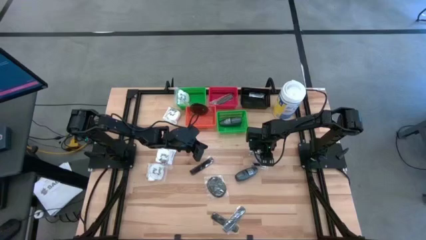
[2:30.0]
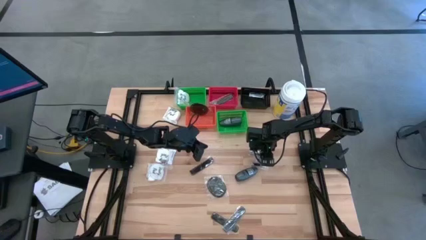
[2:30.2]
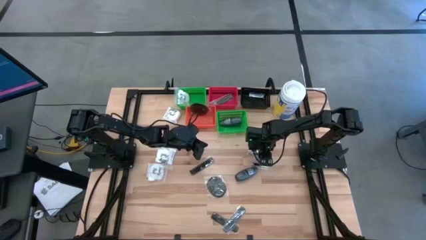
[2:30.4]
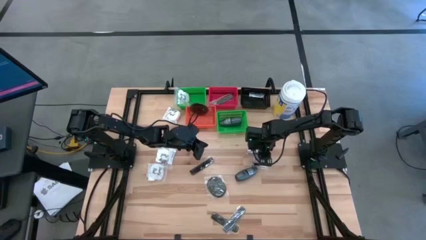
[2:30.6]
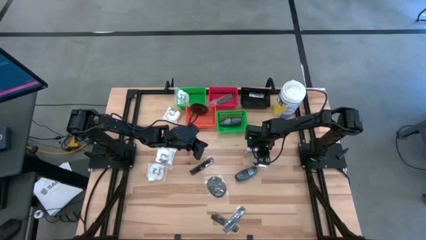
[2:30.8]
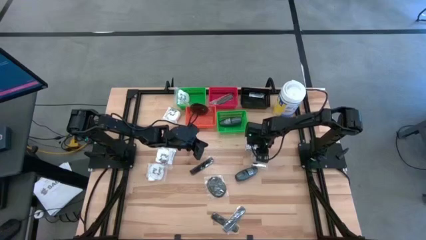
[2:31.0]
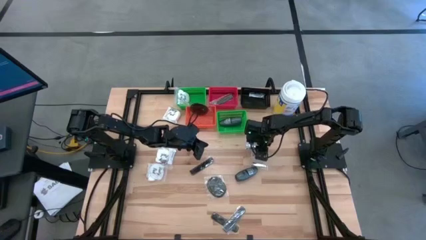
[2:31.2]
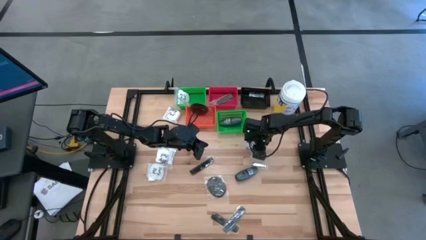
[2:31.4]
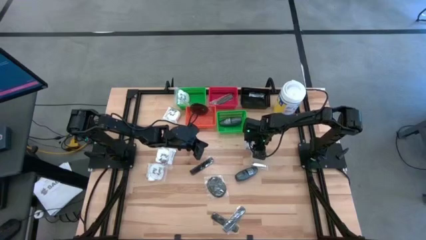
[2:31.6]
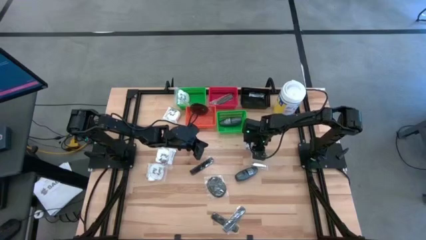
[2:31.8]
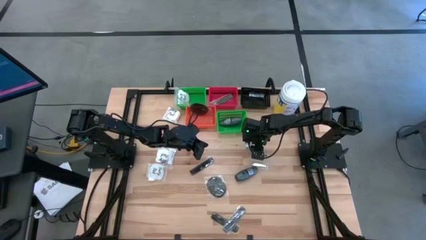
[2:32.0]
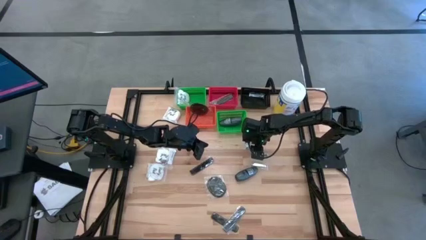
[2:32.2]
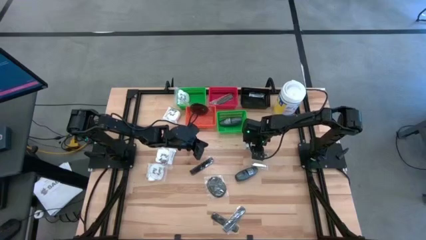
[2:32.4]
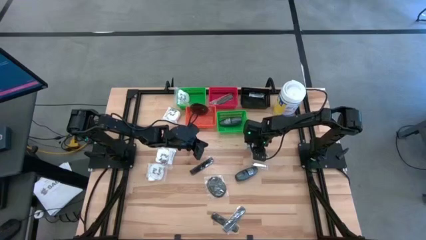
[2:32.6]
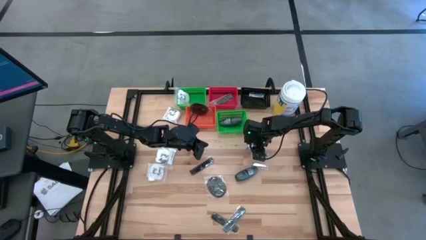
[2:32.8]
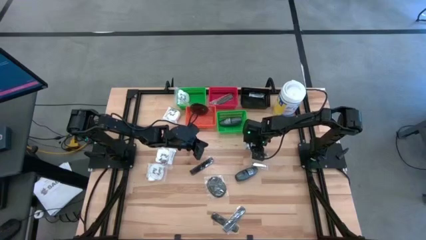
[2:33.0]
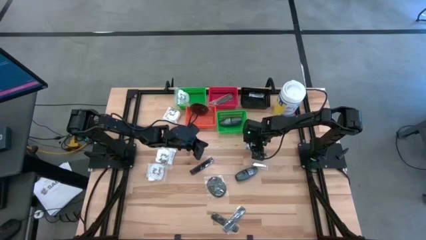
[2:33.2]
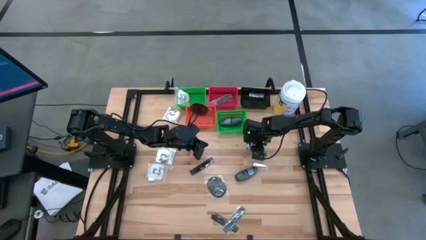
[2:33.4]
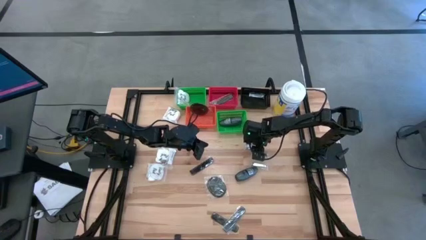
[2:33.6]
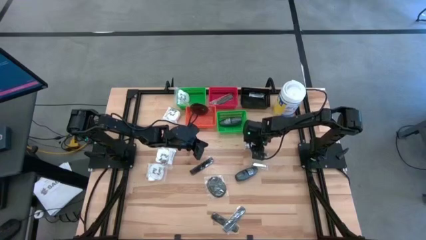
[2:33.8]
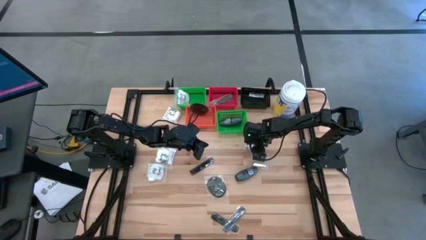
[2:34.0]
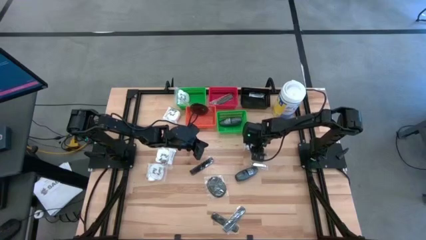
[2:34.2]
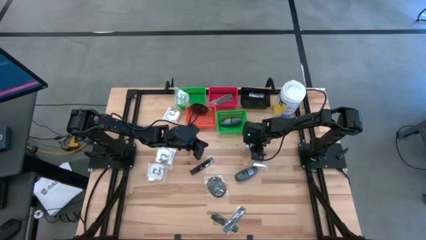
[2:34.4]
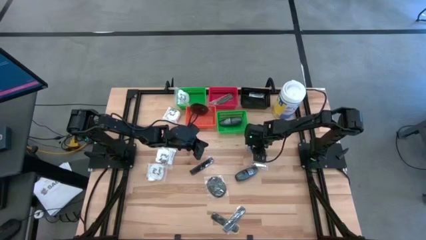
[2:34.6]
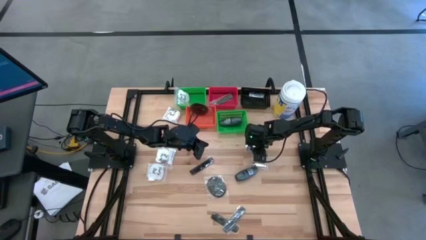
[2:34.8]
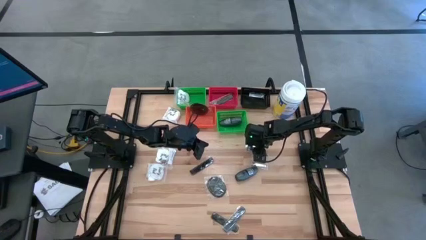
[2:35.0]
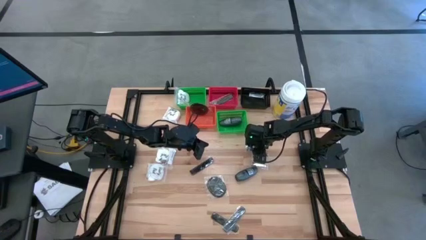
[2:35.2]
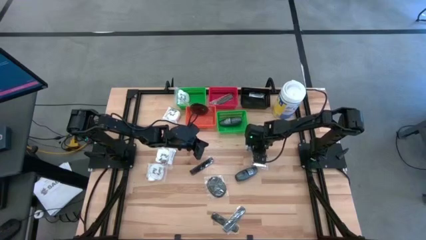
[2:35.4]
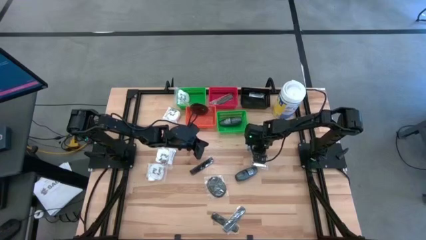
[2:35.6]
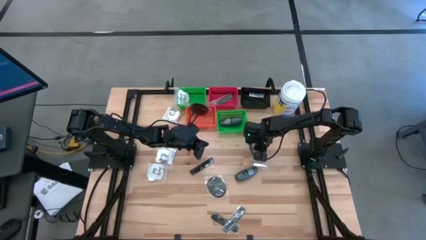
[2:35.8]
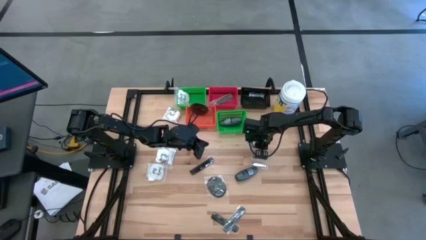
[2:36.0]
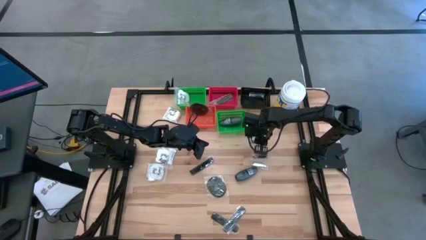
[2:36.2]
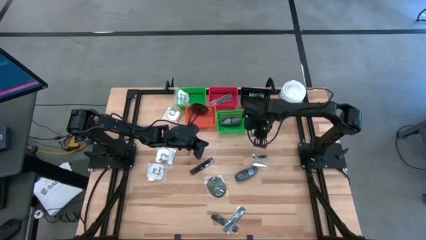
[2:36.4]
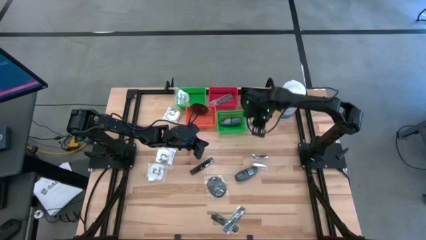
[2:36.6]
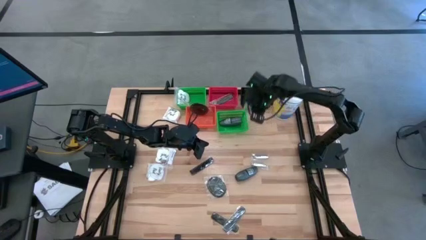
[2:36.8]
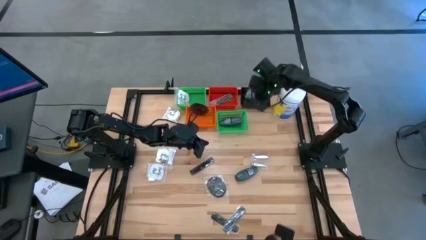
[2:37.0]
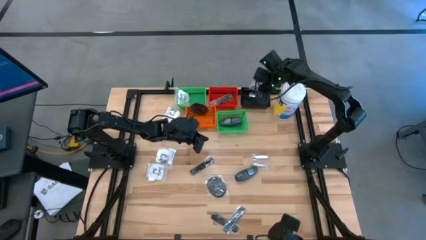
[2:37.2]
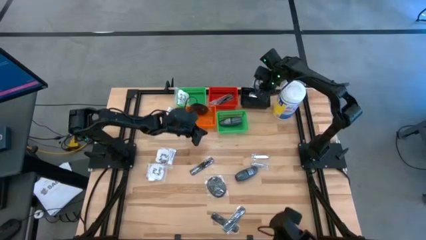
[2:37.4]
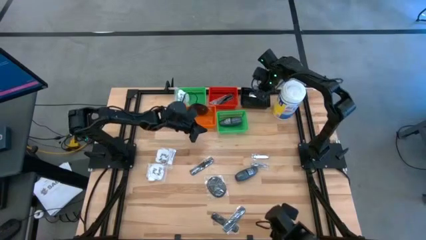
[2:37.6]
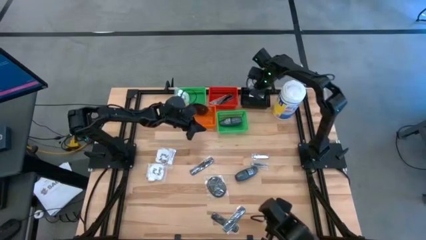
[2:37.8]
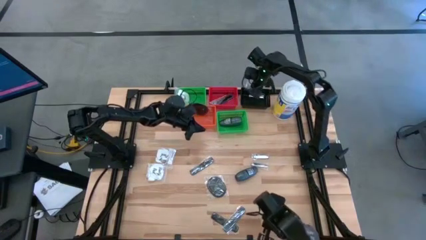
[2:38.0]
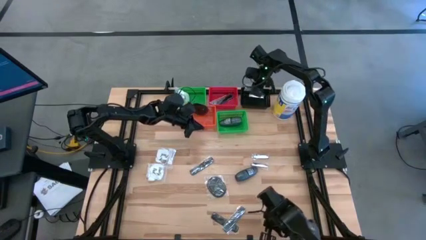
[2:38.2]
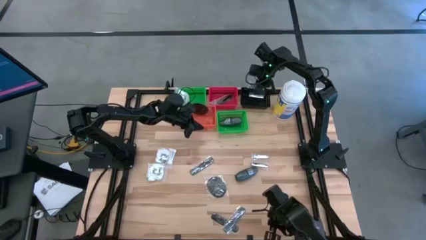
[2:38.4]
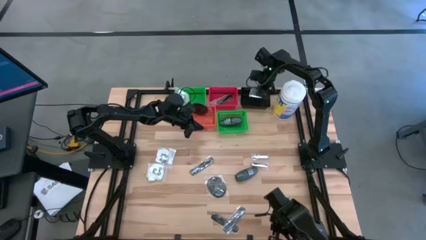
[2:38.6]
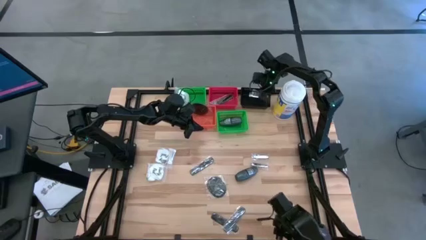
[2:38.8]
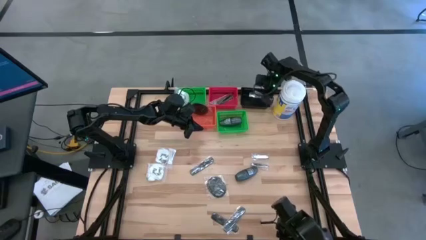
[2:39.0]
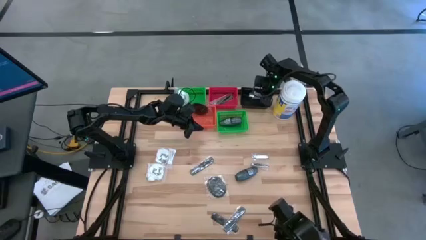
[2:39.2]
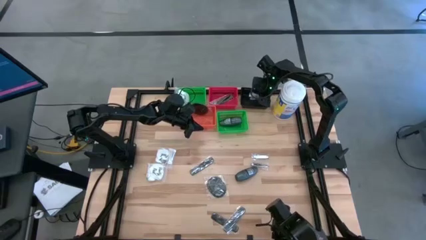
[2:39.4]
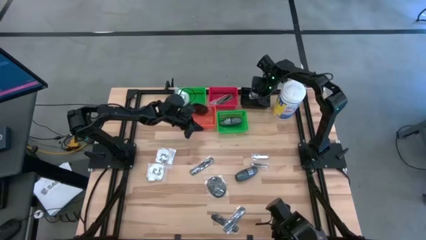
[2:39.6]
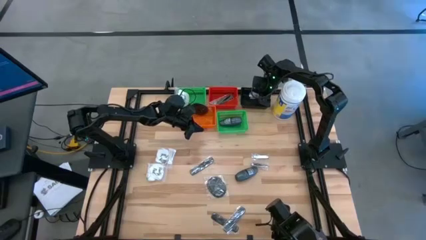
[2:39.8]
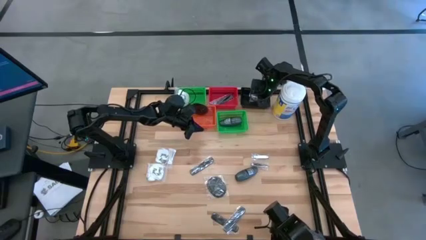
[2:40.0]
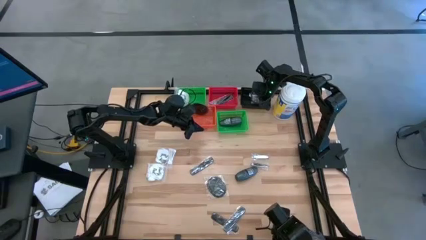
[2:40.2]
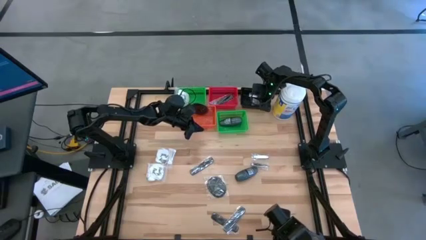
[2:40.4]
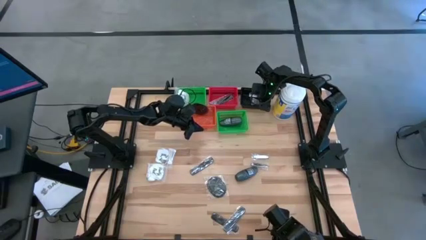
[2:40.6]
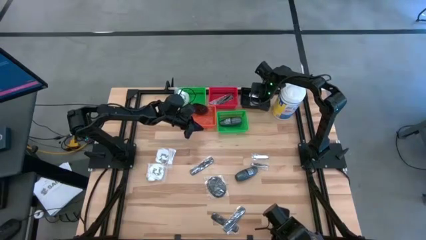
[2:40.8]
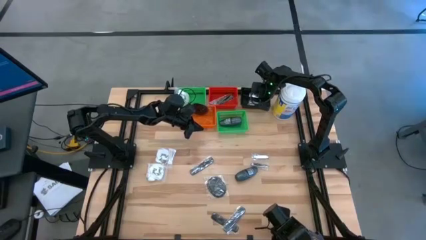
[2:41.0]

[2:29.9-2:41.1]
Task: Pick & Place Travel size toiletries
Put the nail cutter into the black bin

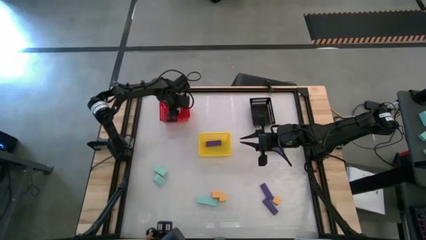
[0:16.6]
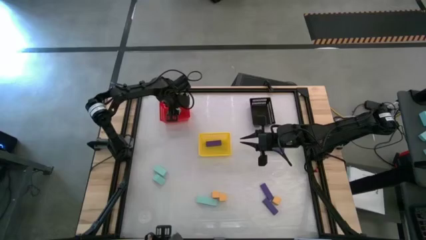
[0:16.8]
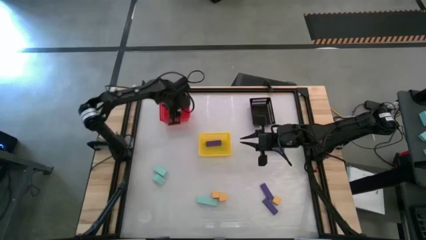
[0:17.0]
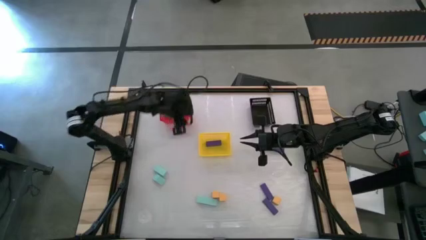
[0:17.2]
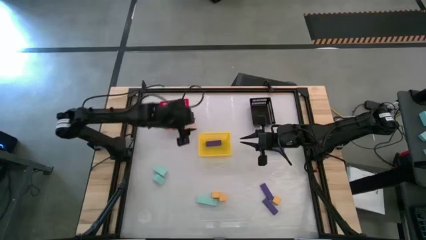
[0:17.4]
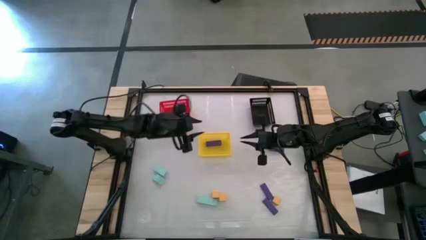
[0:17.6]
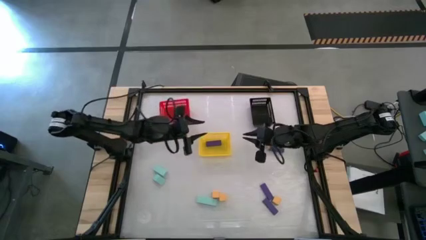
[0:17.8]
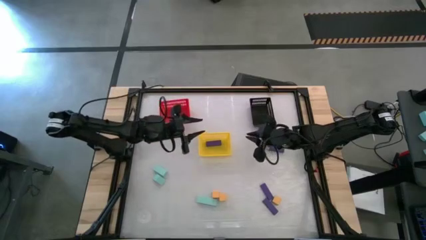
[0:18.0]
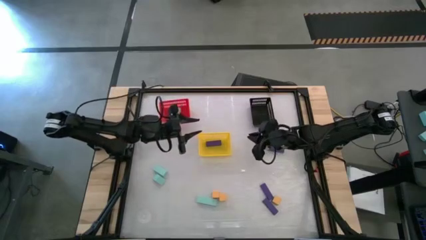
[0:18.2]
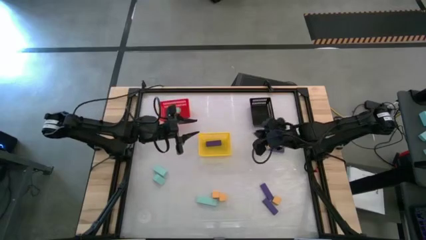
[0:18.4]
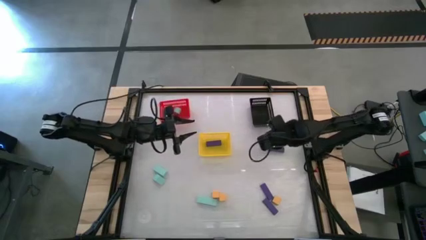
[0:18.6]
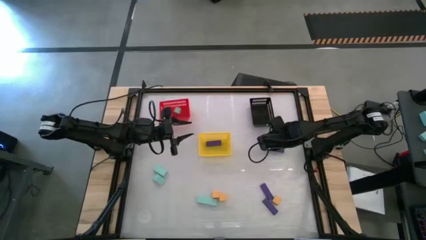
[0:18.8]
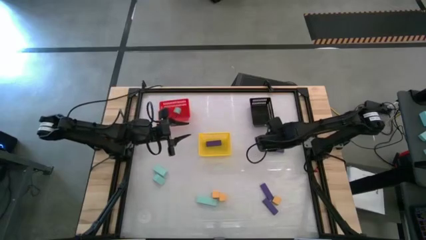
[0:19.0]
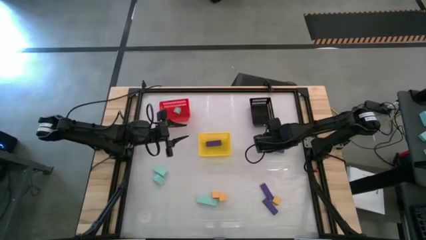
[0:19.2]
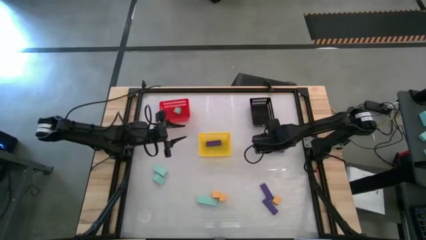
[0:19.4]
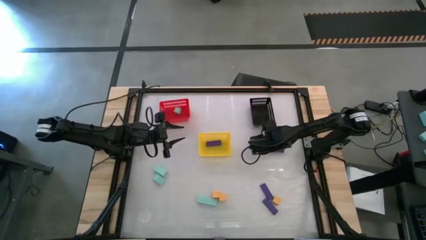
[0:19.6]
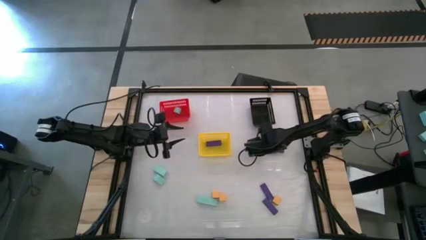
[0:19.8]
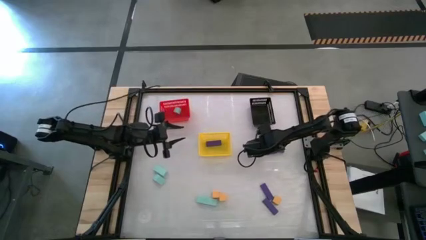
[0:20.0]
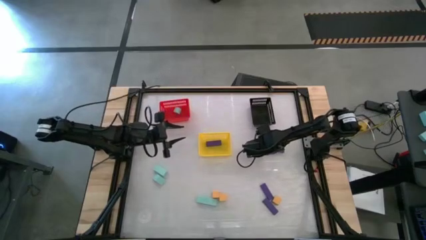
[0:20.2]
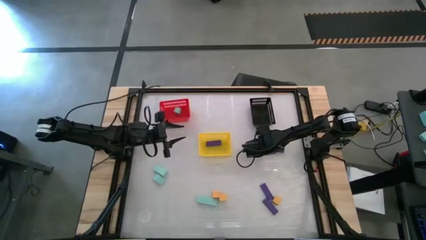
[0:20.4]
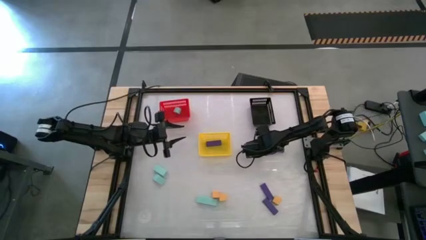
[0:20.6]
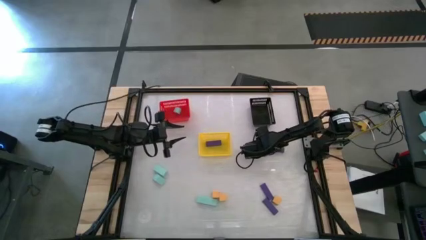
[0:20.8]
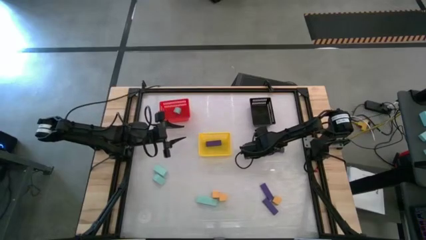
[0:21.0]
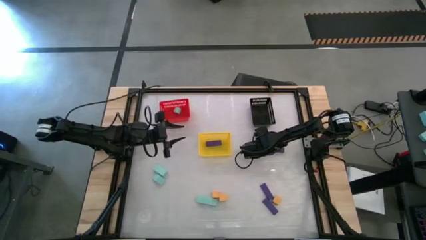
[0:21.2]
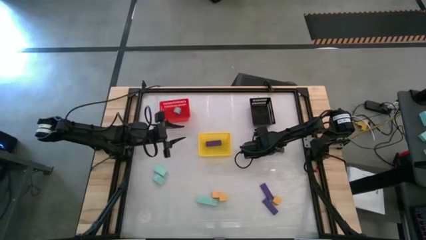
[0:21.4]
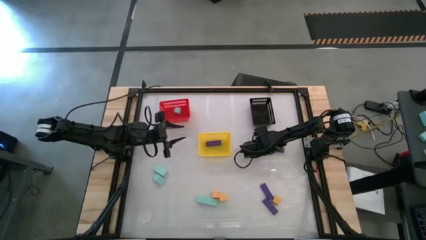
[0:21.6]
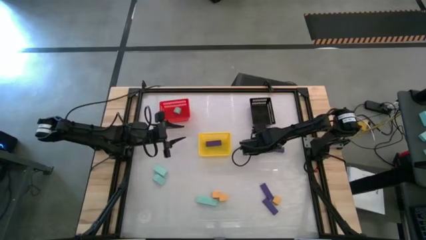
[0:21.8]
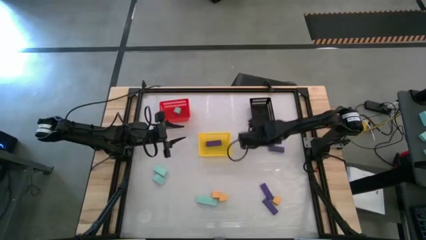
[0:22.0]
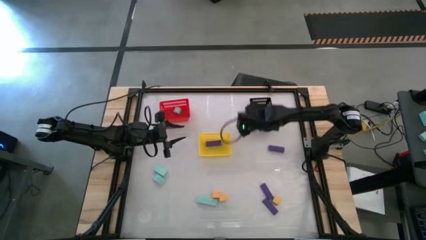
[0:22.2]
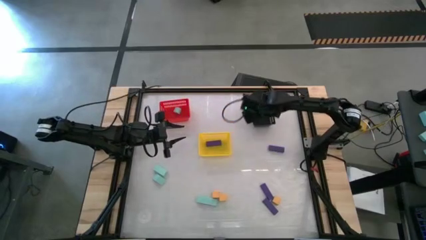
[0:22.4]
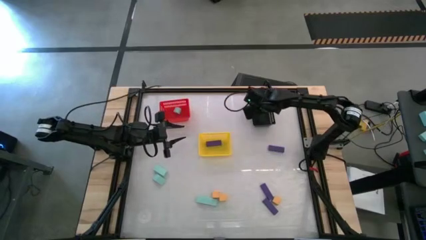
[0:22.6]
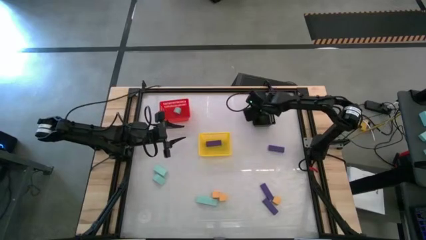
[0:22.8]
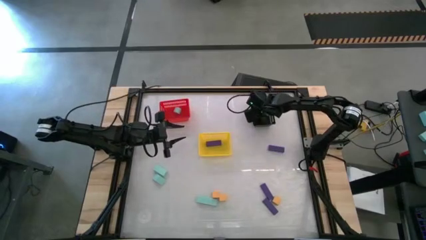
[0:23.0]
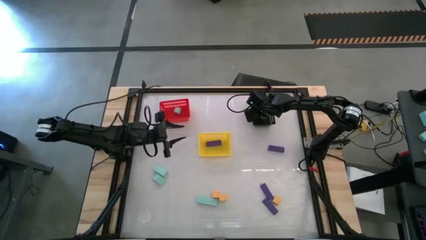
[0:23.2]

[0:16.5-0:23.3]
Task: Sort & place blocks by color
Put the orange block into the black bin
